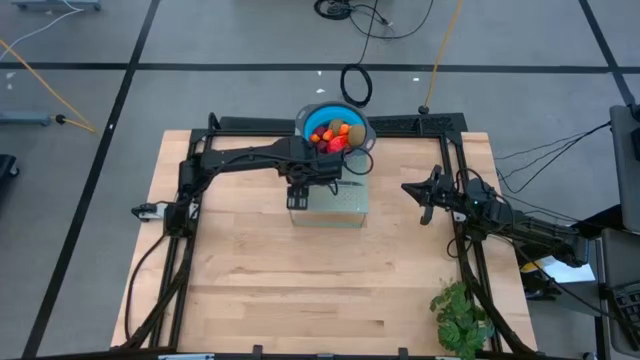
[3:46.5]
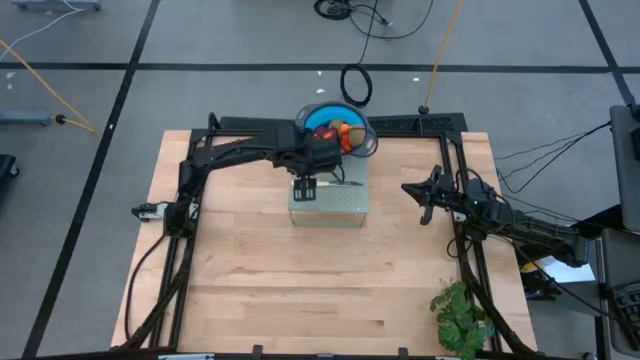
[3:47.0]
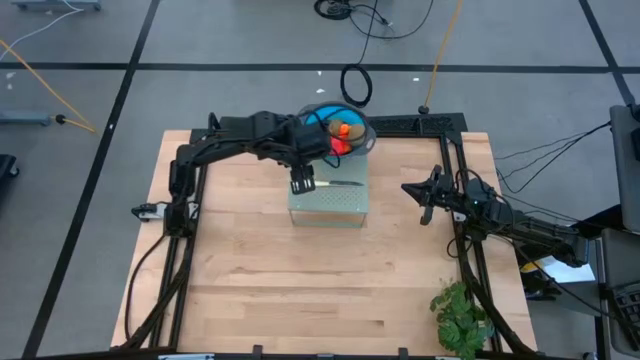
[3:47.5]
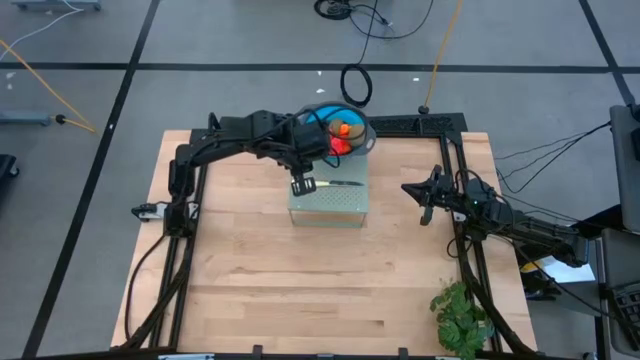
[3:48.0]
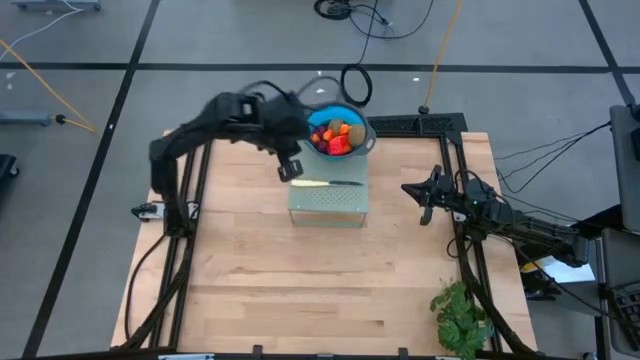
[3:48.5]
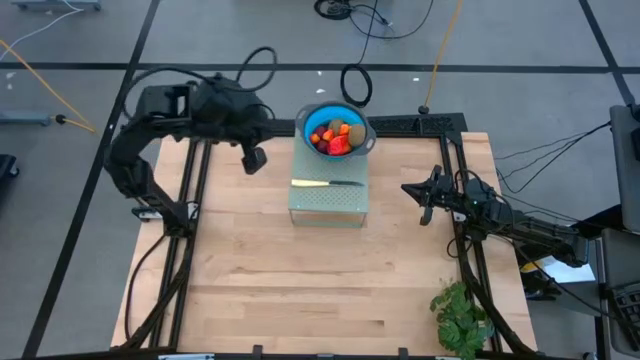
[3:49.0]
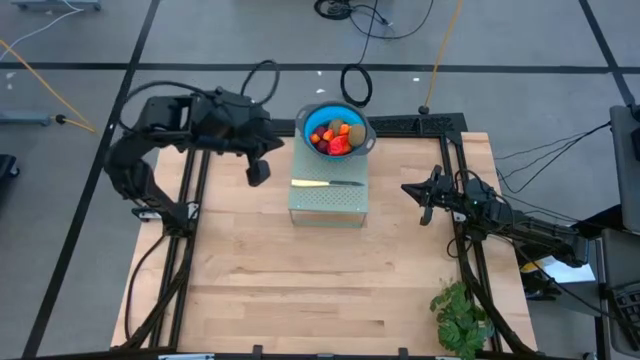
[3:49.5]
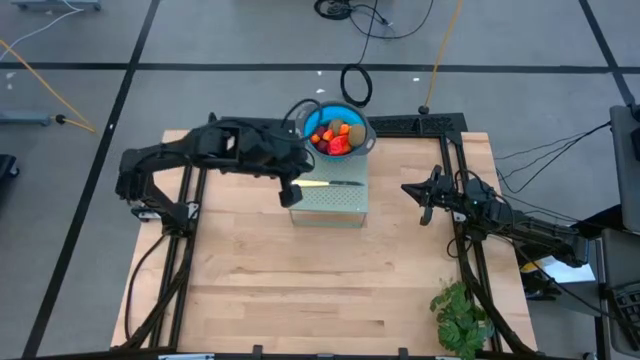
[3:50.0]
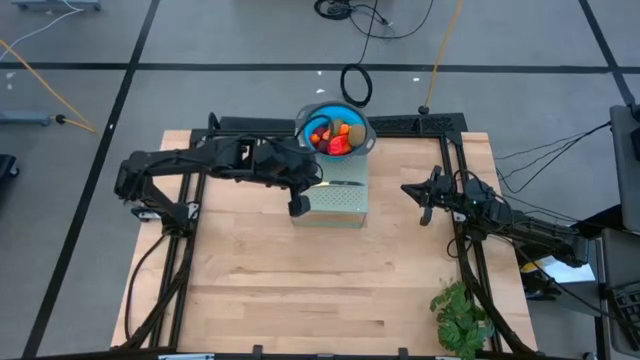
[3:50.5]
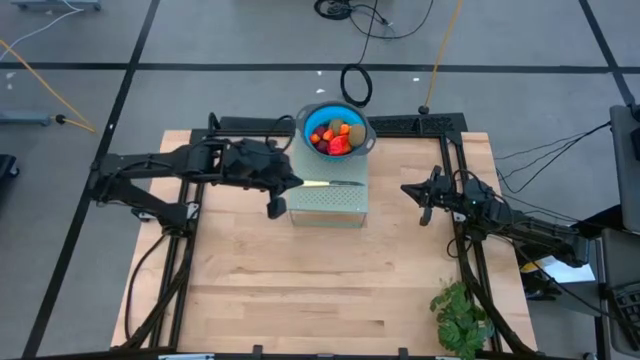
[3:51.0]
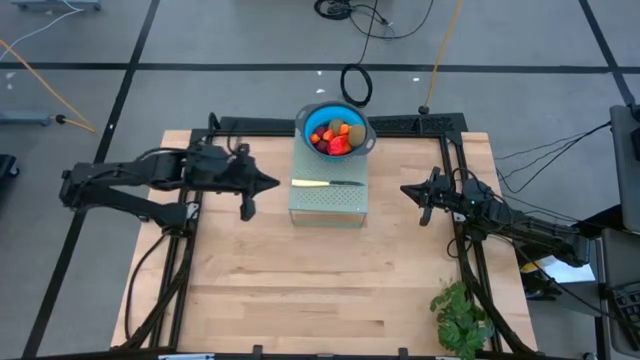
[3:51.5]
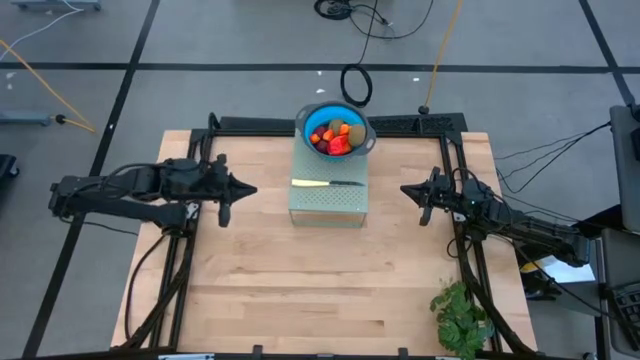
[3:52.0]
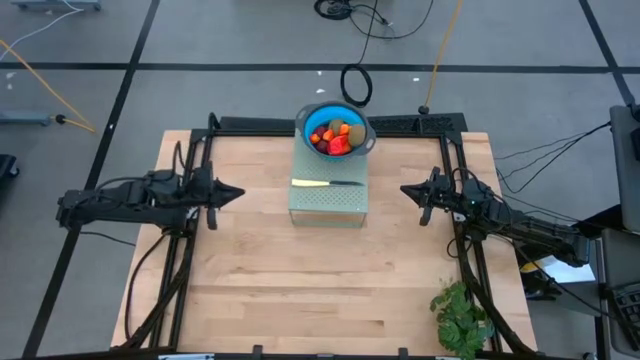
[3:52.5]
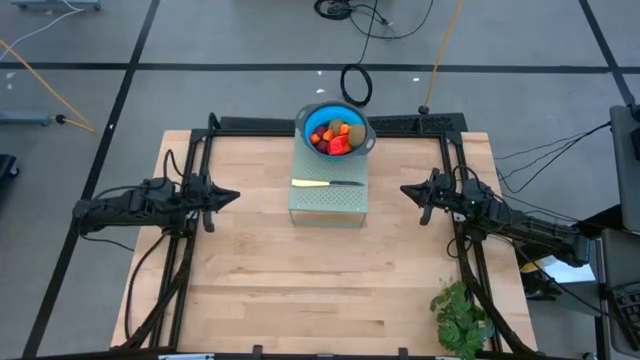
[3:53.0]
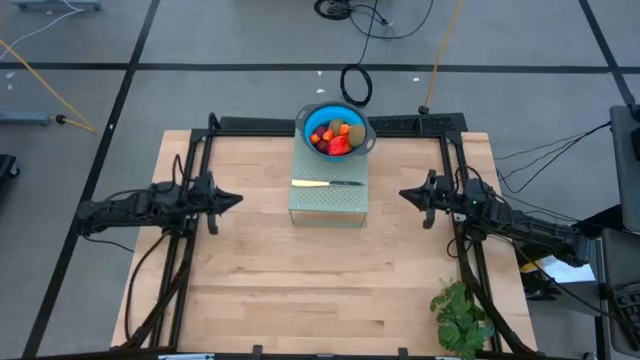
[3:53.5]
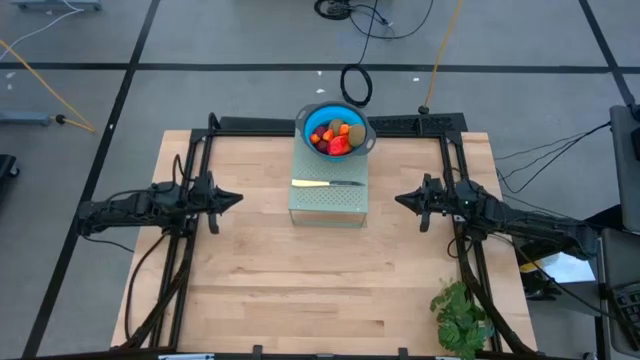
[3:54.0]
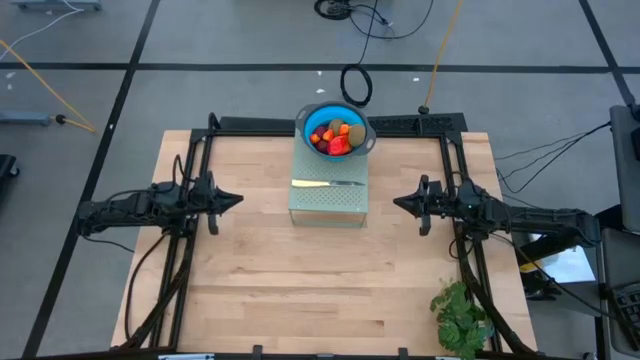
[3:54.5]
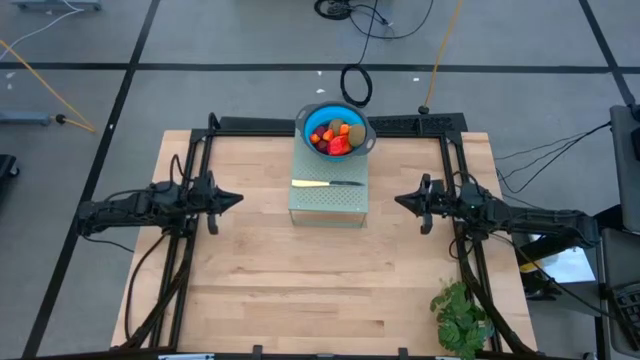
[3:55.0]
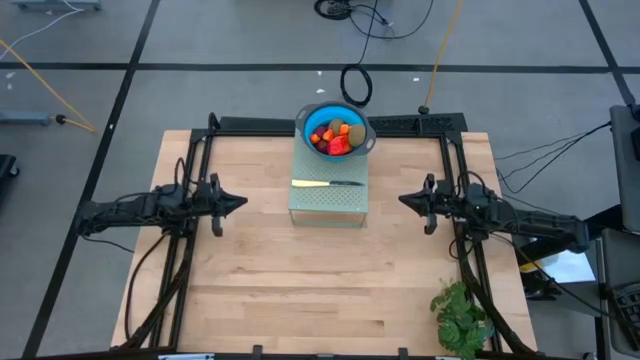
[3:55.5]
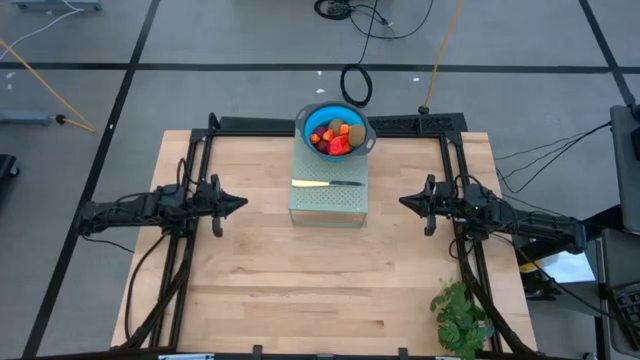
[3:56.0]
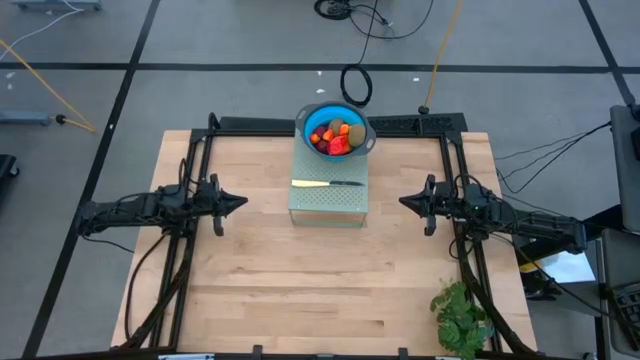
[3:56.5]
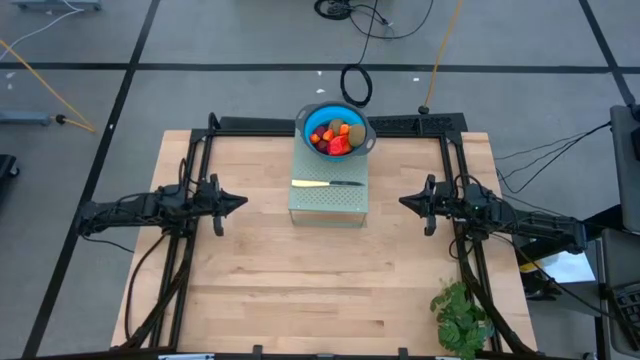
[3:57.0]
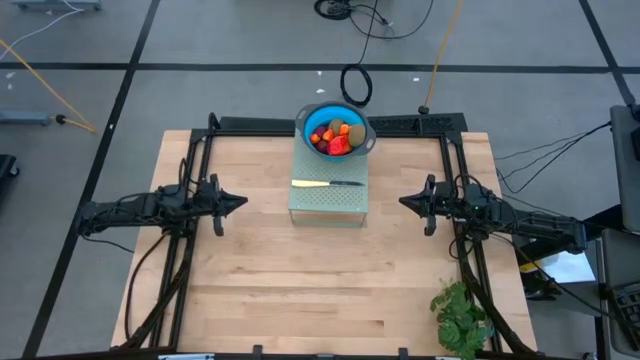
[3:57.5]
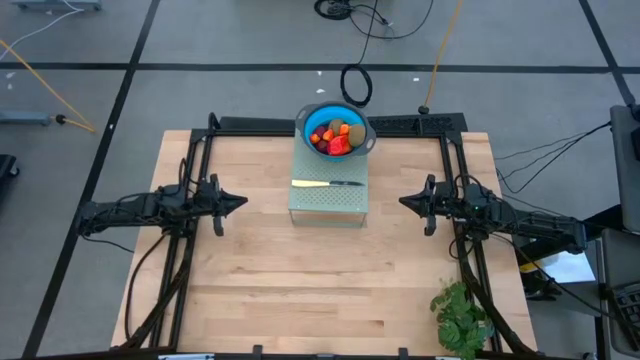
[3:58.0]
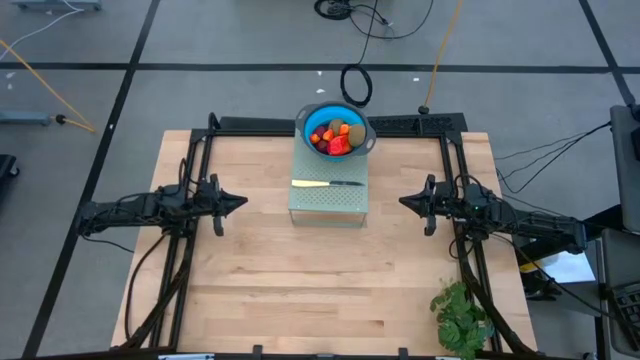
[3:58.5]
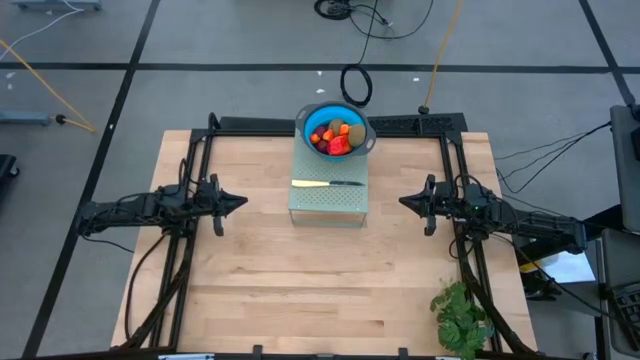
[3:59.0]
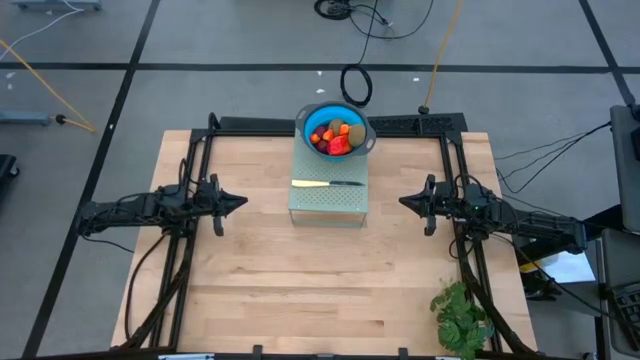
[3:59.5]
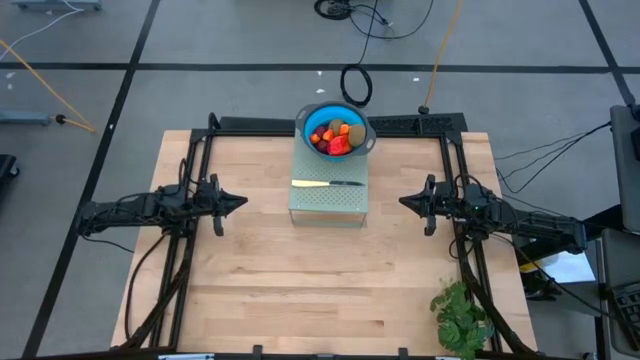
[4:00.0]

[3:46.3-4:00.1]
Task: Pick & Place Fruit
Return to Home Position

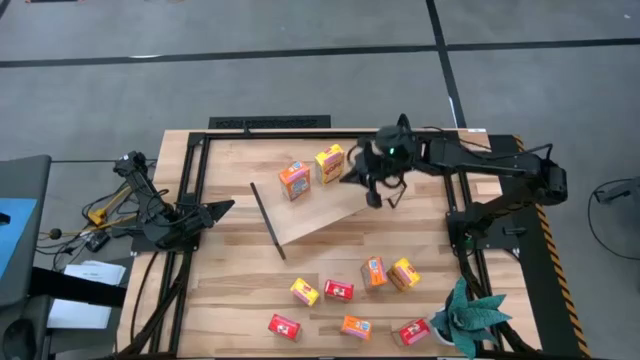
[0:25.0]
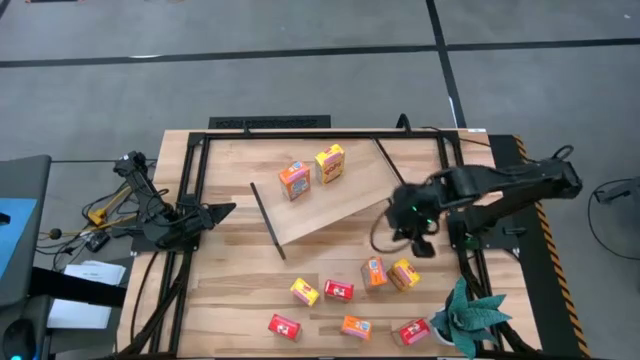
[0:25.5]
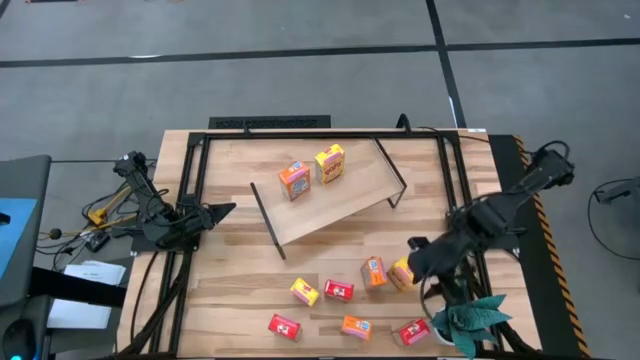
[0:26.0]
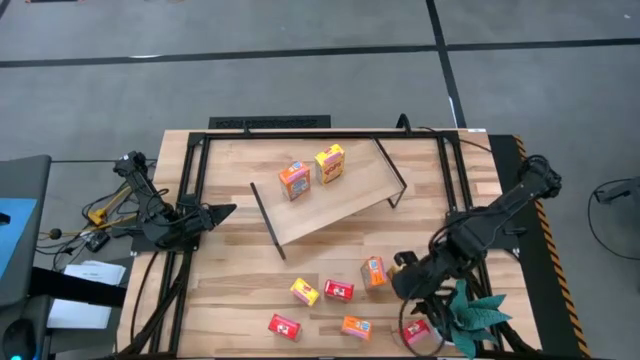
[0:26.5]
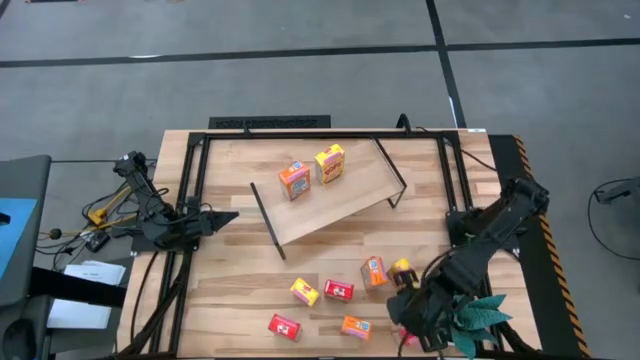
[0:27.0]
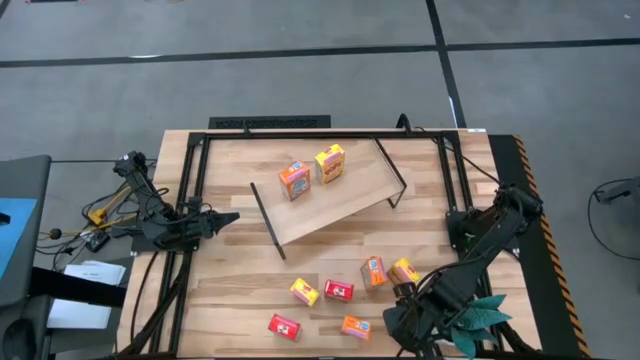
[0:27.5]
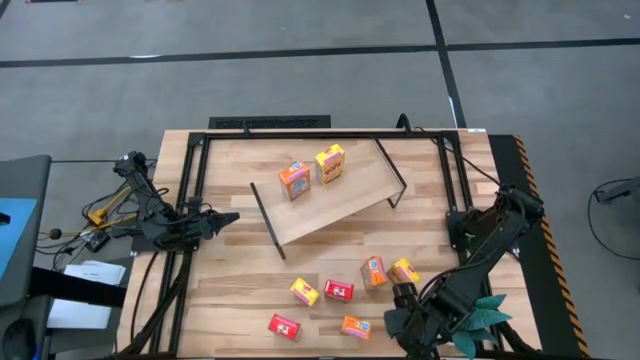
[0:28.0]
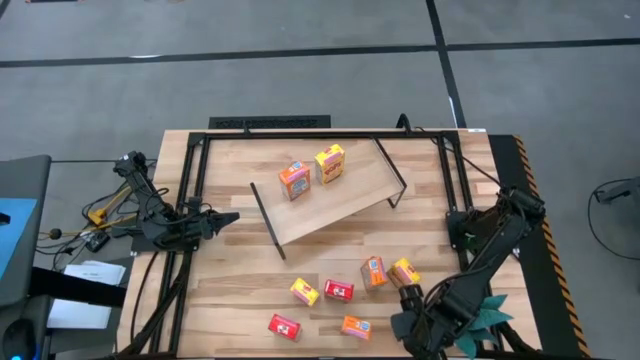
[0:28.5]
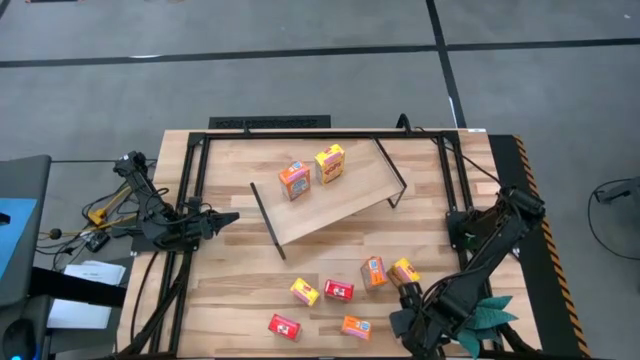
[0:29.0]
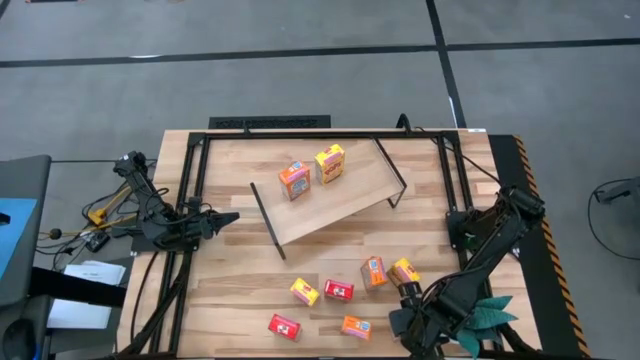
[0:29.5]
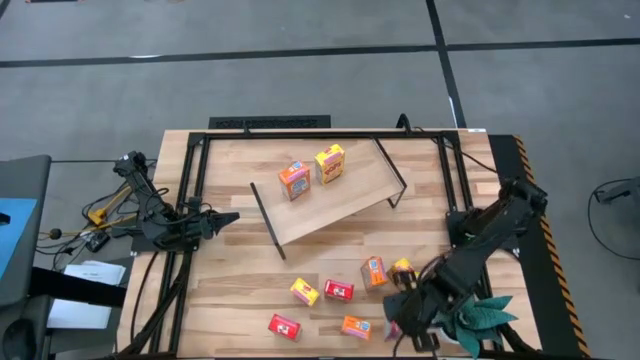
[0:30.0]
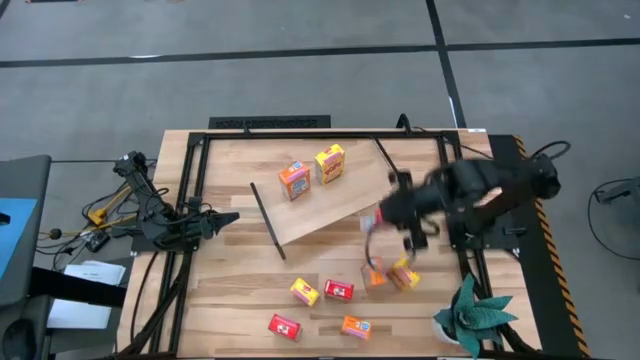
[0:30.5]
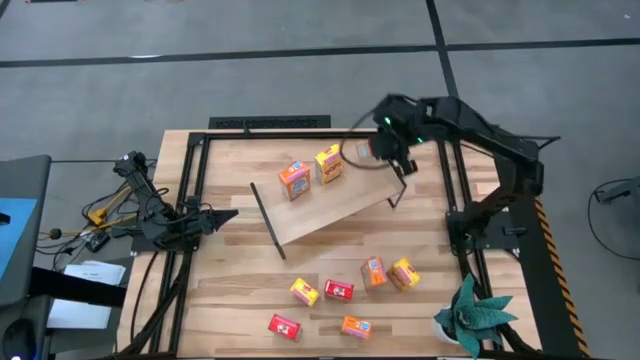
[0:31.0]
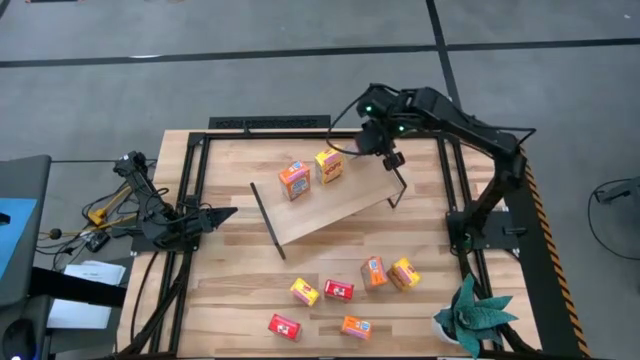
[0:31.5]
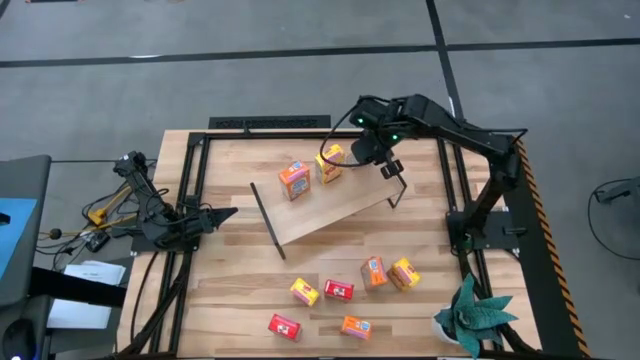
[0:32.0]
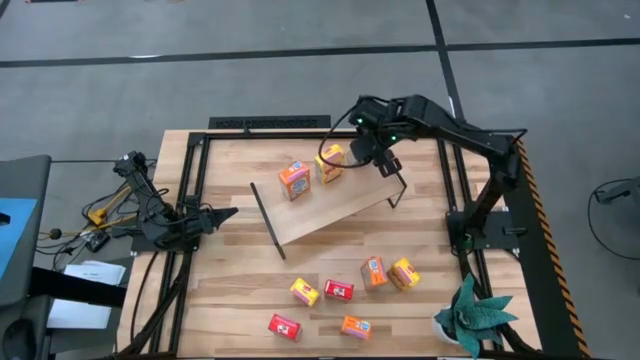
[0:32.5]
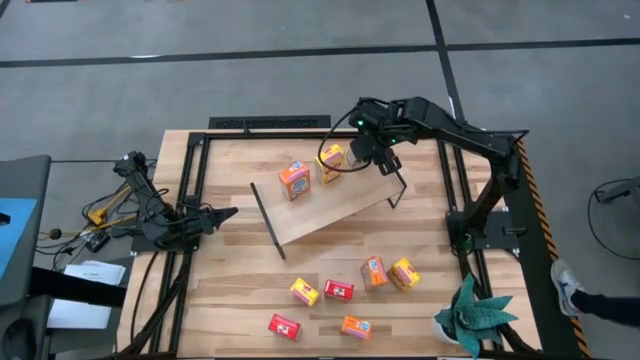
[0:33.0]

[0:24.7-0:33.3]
Task: Stack cereal on shelf
Put the right red cereal box on the shelf
